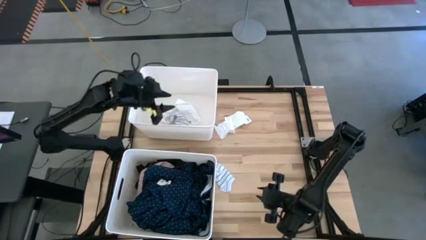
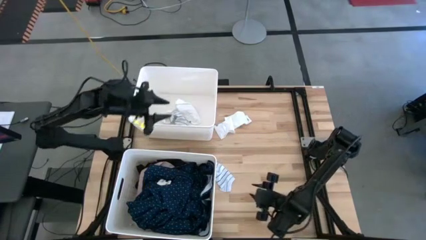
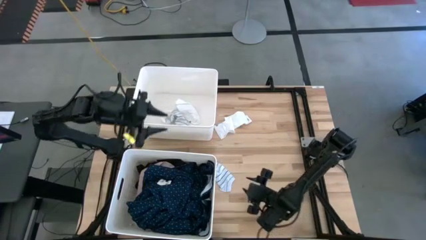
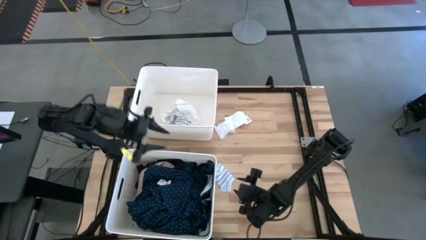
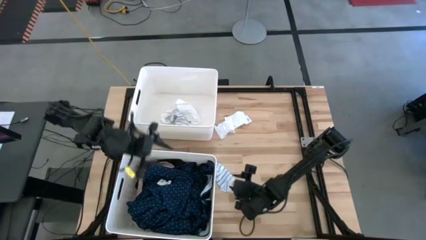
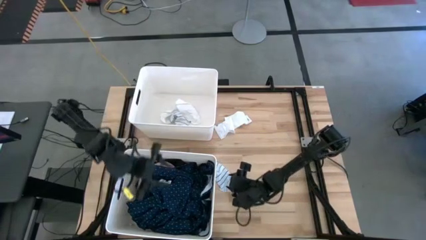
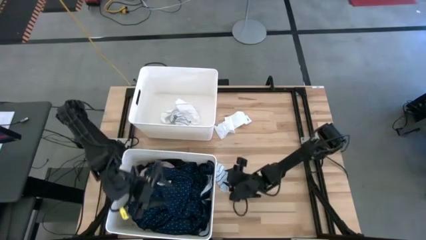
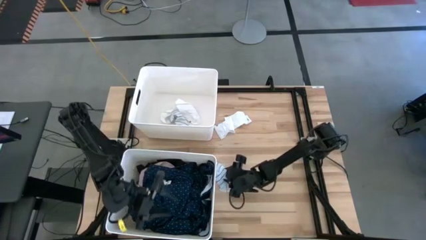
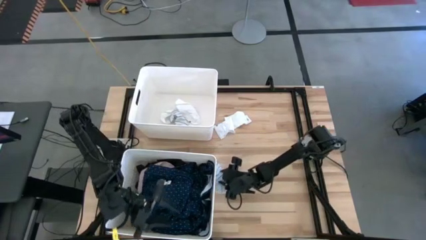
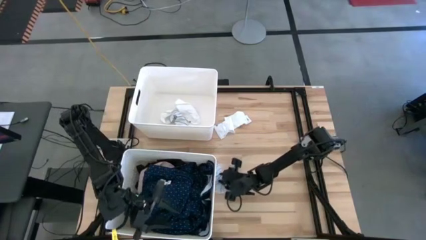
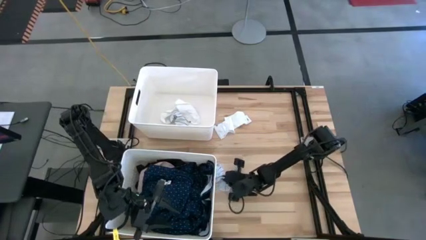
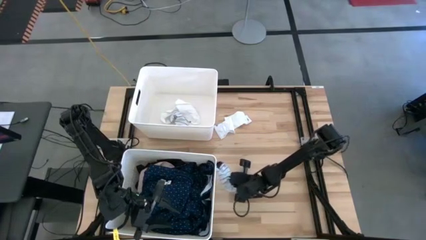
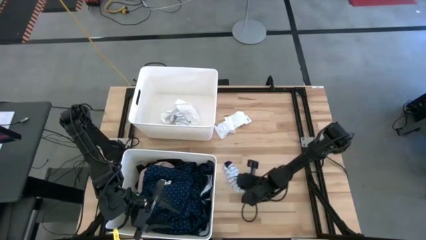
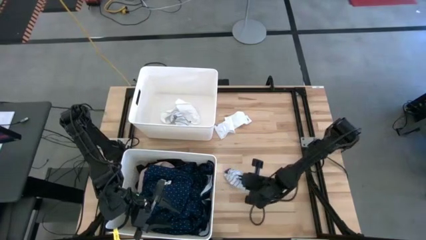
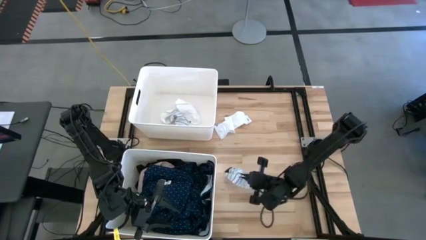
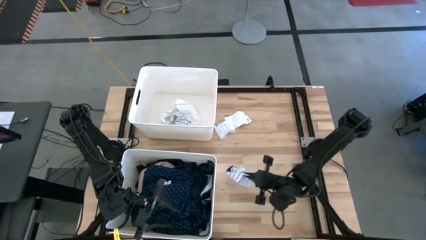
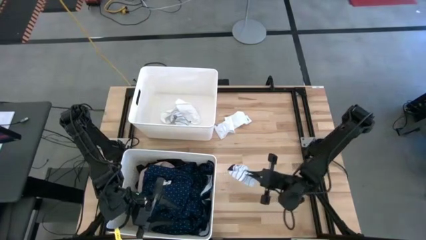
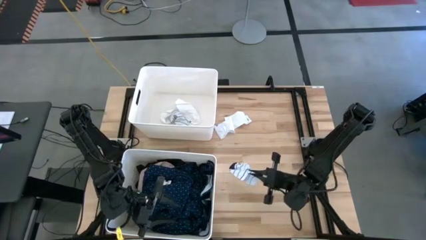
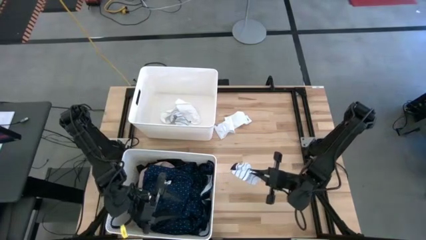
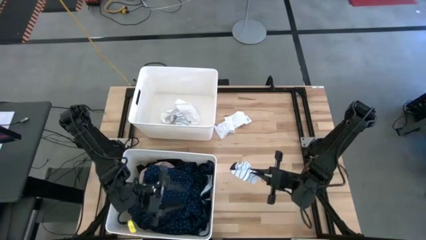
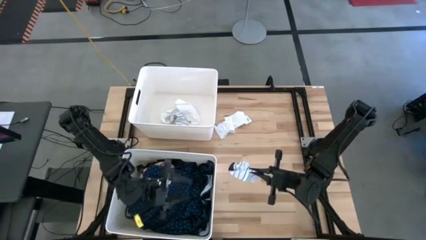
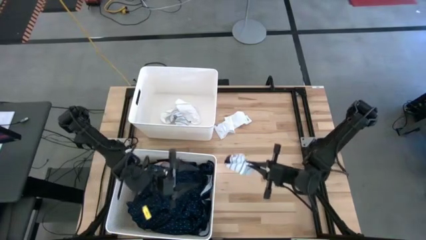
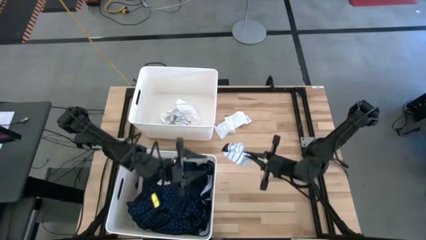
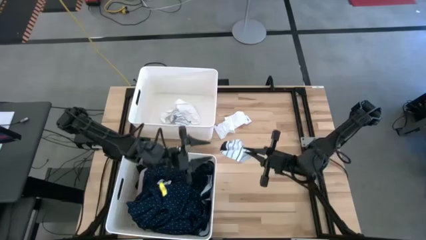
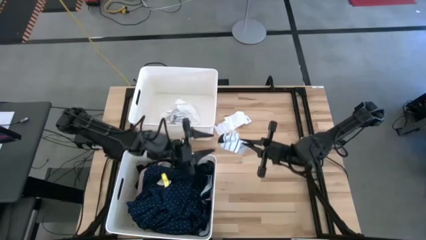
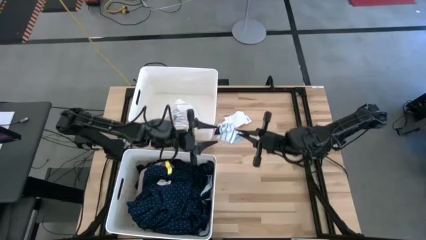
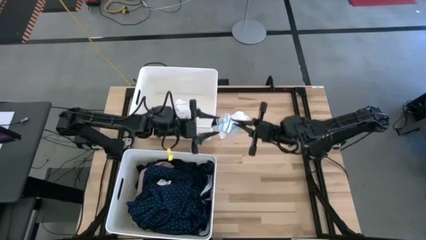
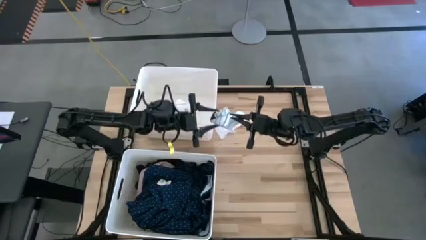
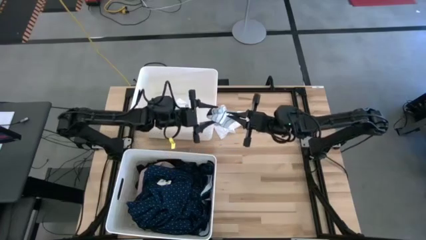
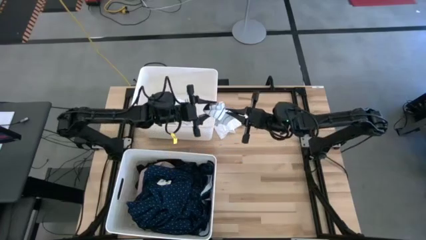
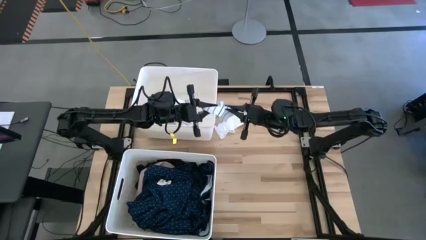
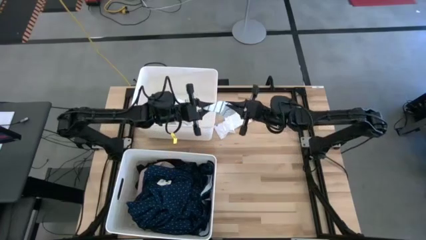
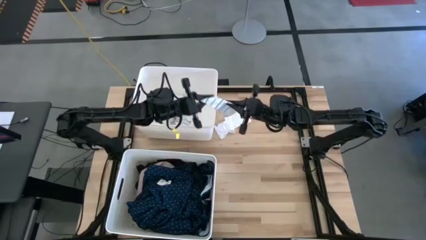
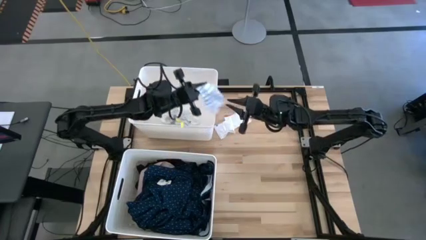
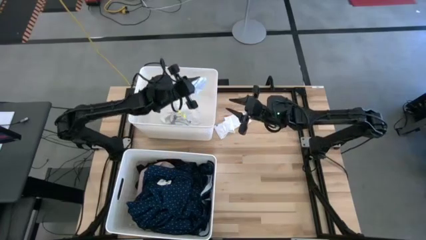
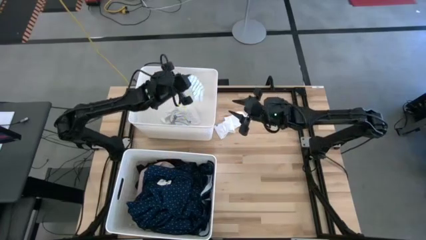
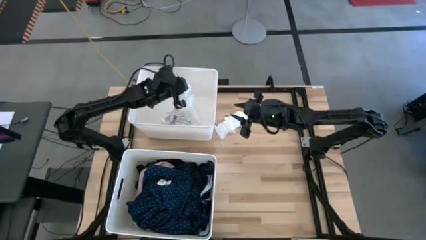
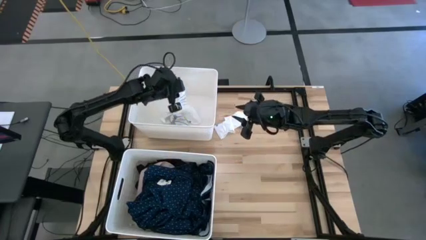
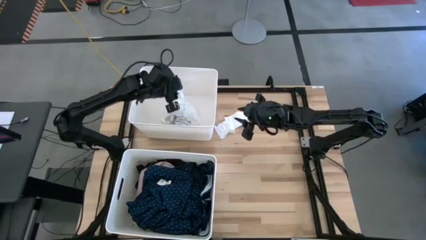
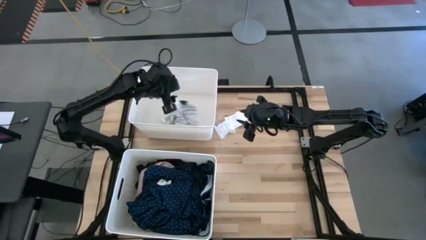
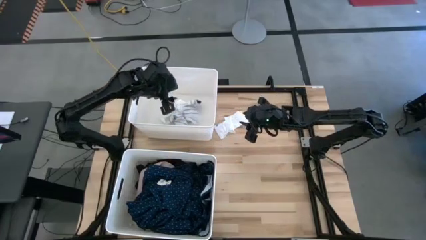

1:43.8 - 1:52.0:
Task: Sort clothes
Put the white stripe sock into the top white laundry organizer

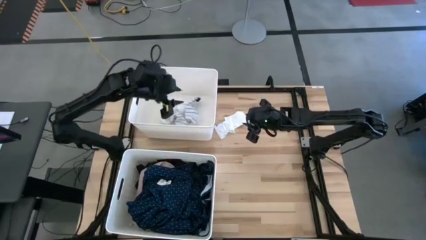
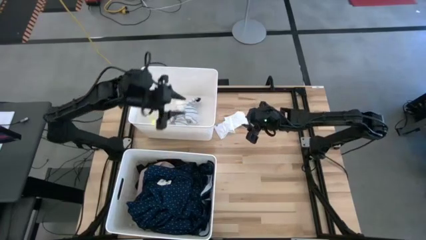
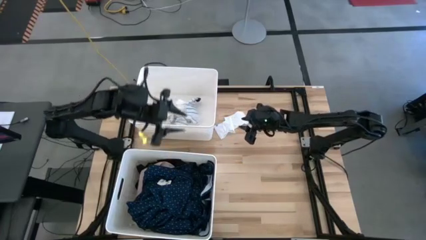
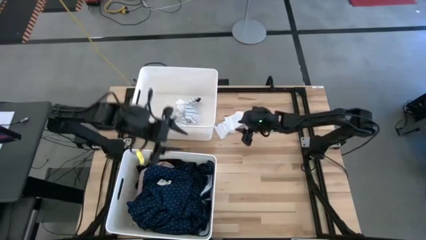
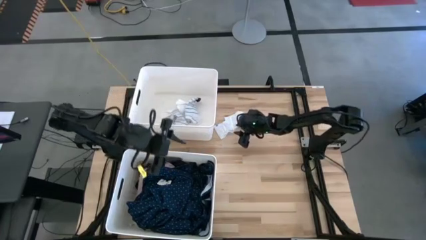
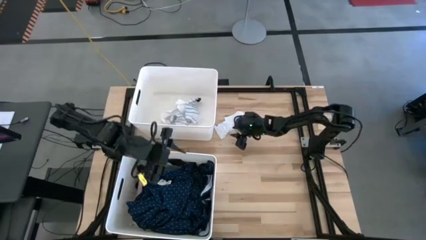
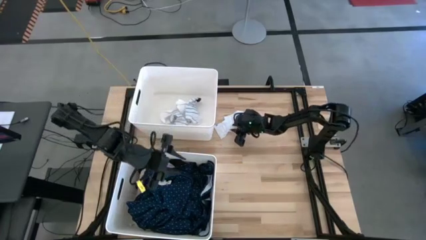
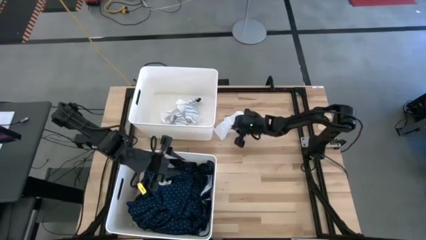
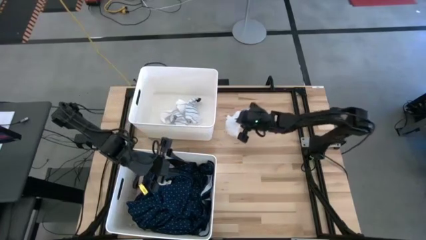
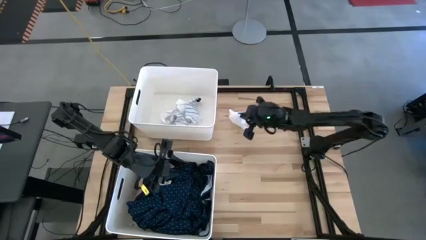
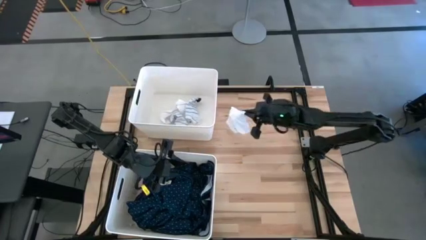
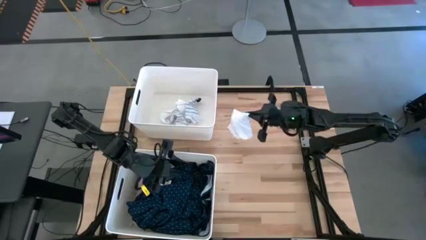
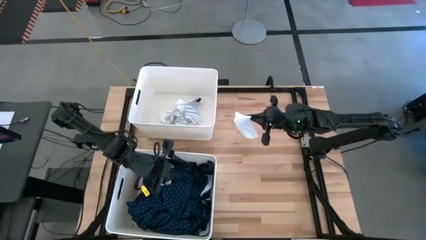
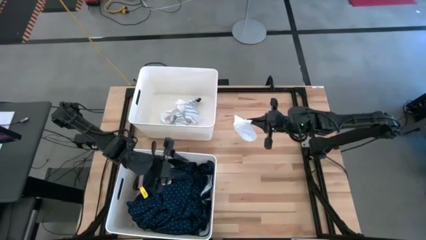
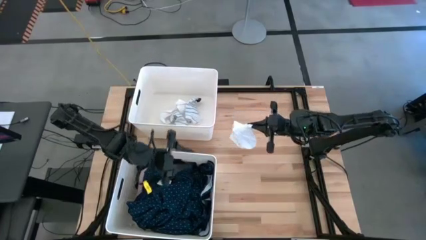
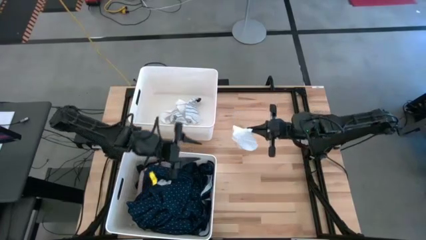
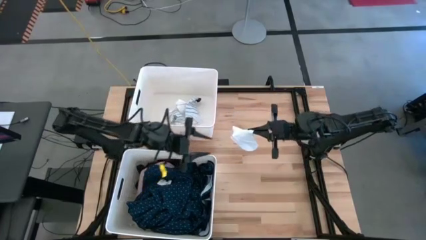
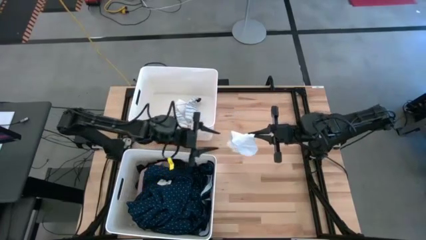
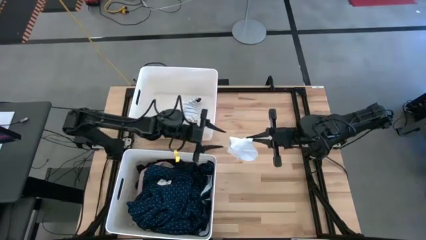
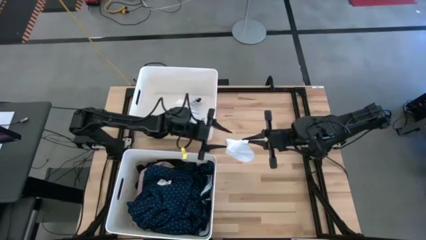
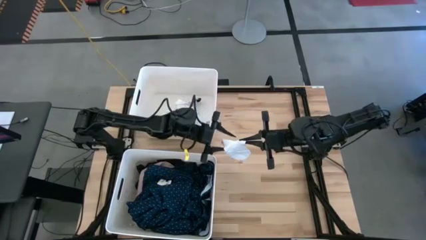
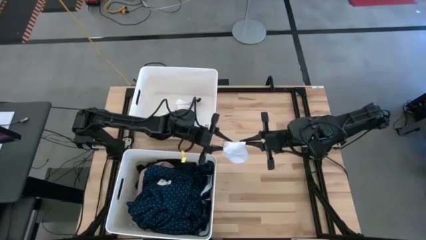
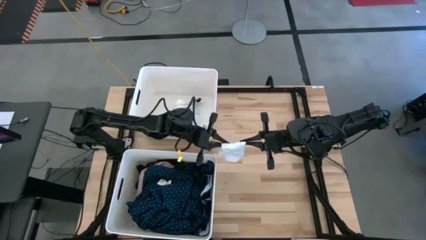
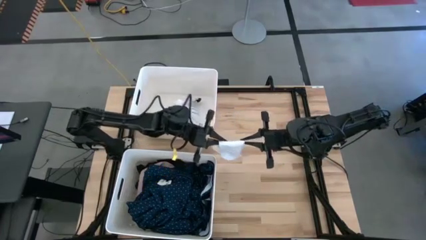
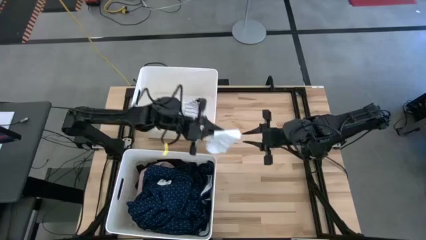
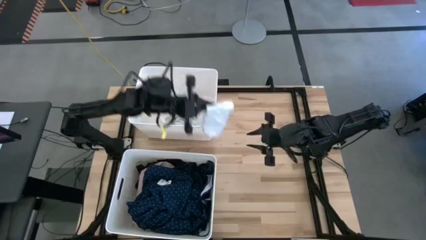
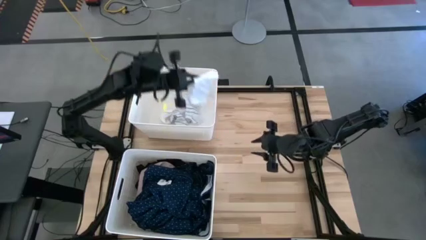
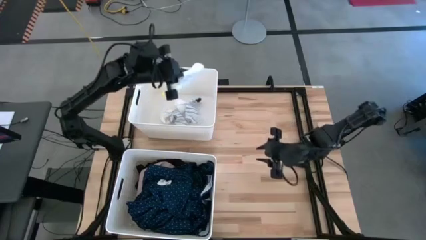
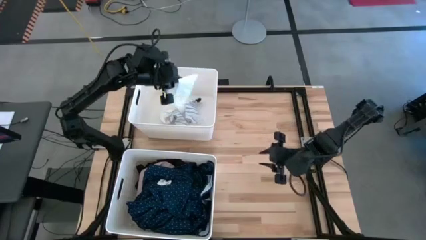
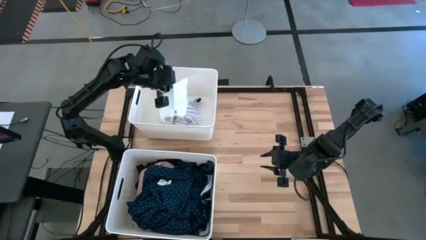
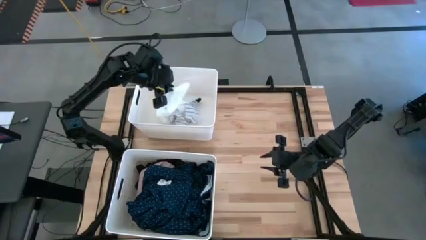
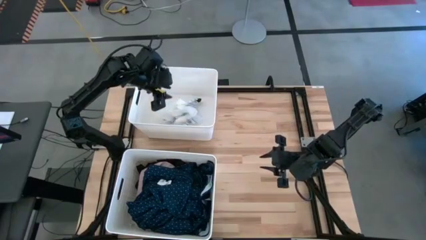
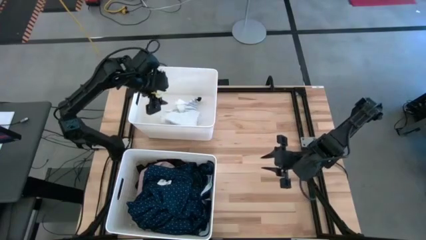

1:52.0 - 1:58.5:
Put the white sock into the top white laundry organizer
